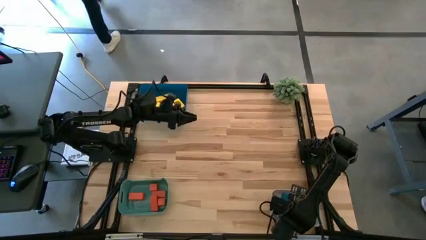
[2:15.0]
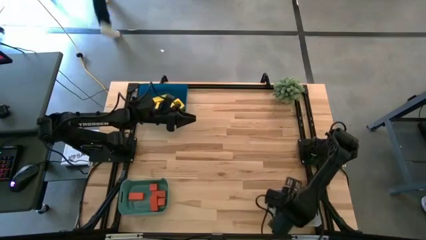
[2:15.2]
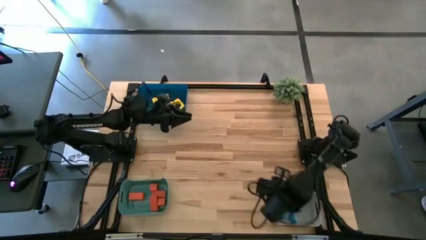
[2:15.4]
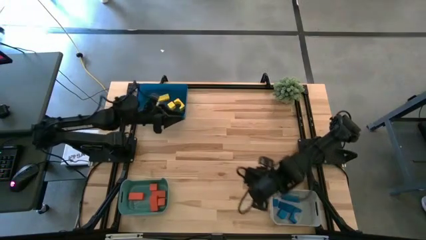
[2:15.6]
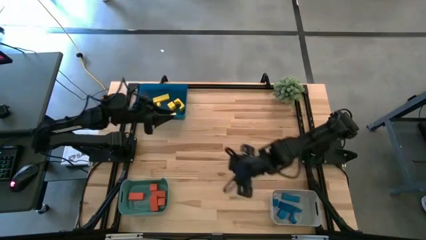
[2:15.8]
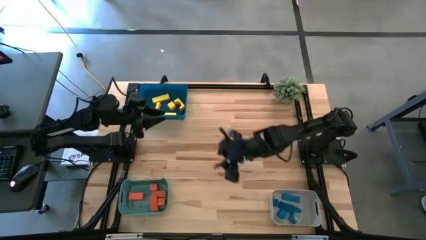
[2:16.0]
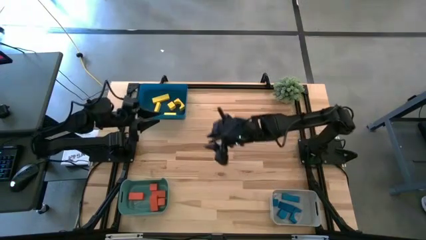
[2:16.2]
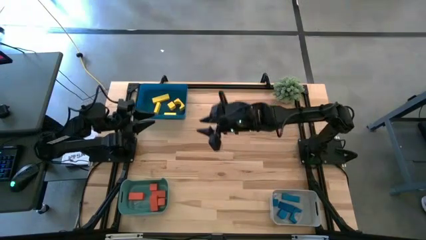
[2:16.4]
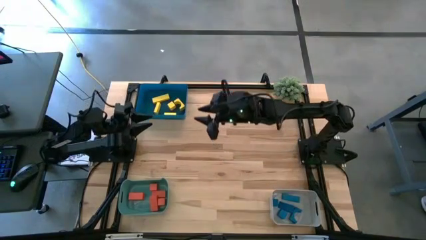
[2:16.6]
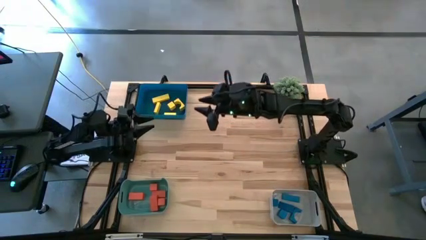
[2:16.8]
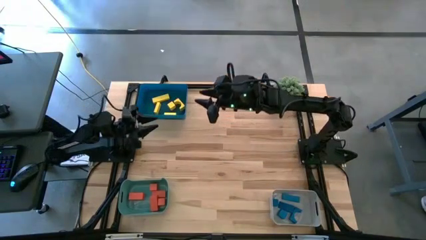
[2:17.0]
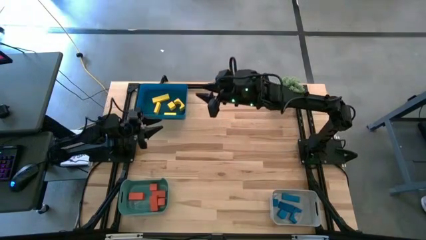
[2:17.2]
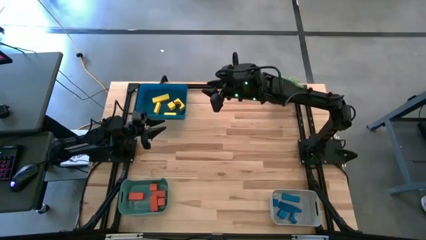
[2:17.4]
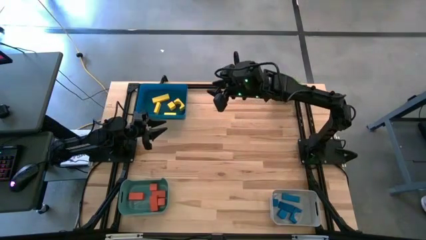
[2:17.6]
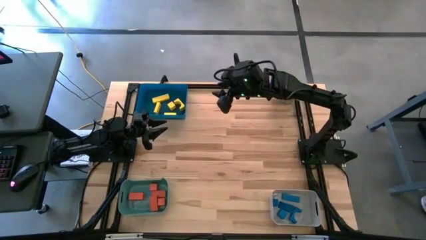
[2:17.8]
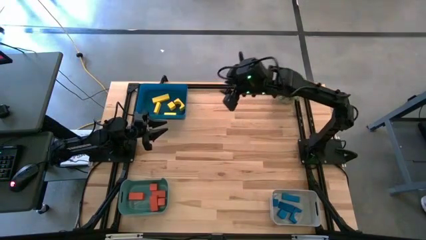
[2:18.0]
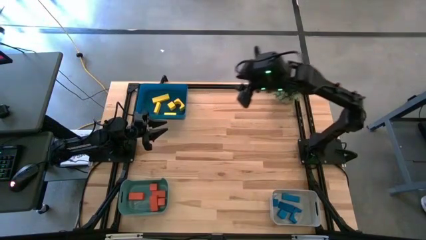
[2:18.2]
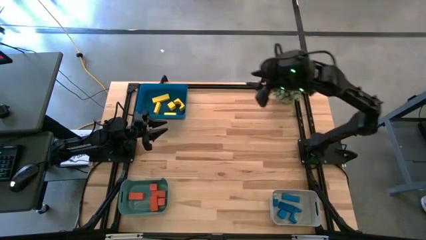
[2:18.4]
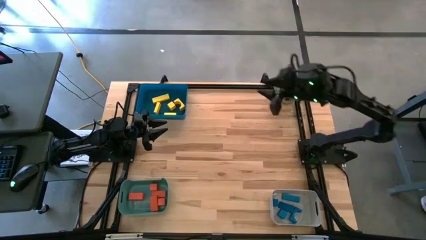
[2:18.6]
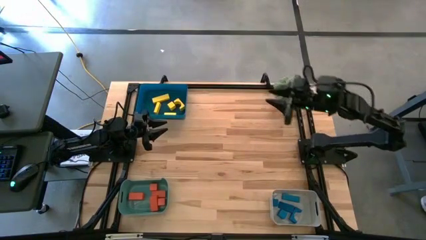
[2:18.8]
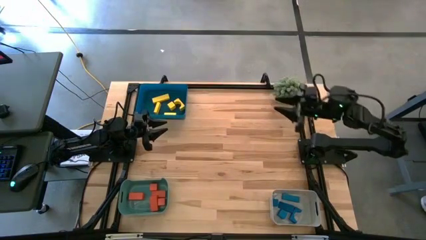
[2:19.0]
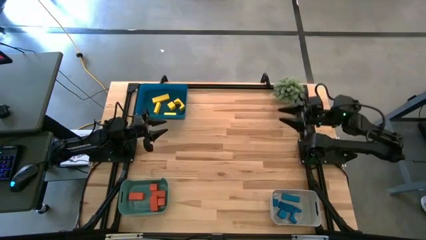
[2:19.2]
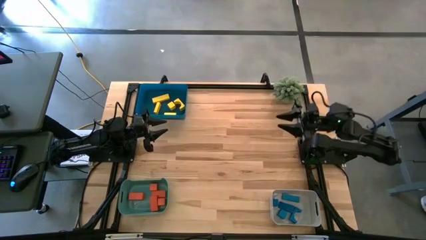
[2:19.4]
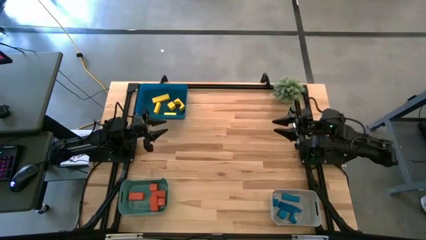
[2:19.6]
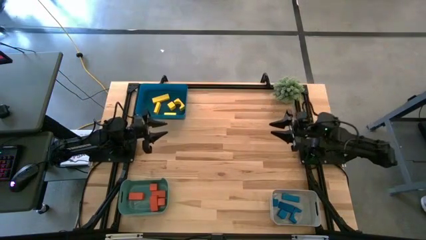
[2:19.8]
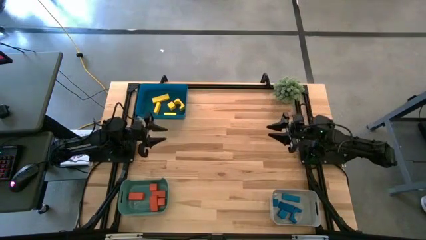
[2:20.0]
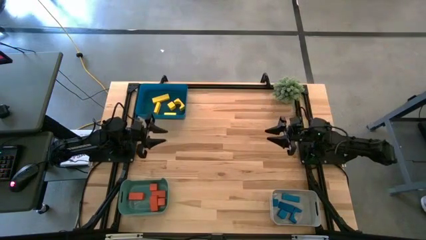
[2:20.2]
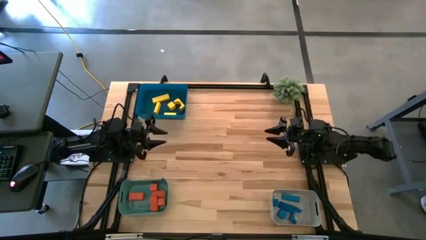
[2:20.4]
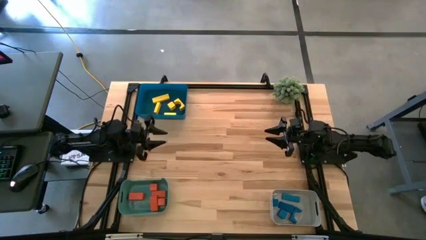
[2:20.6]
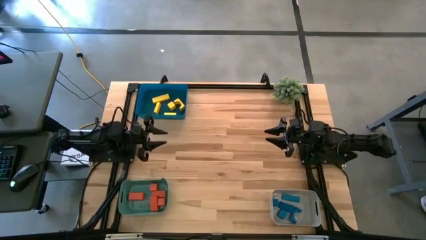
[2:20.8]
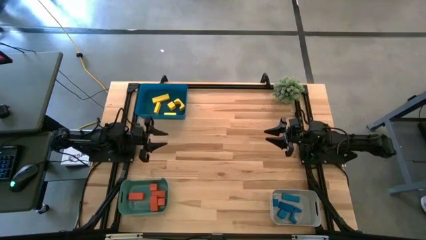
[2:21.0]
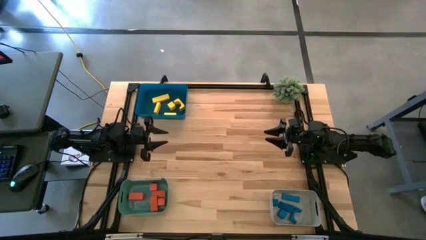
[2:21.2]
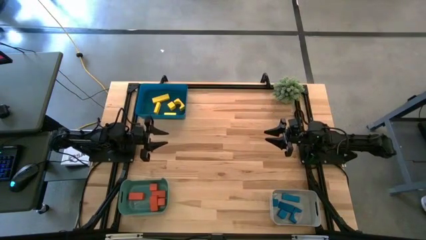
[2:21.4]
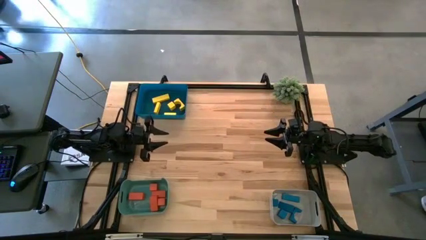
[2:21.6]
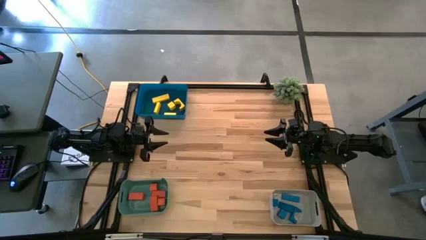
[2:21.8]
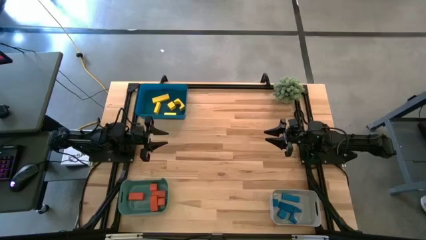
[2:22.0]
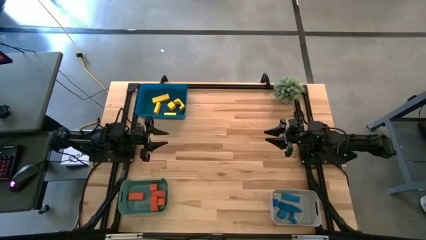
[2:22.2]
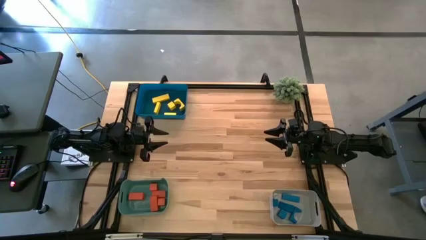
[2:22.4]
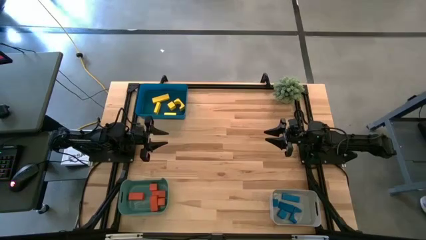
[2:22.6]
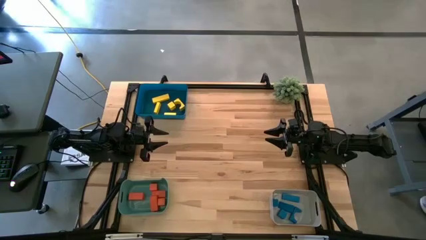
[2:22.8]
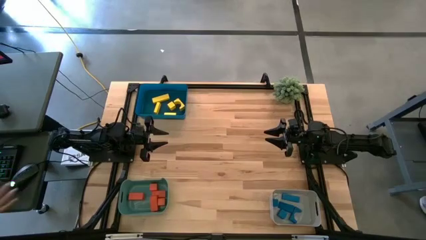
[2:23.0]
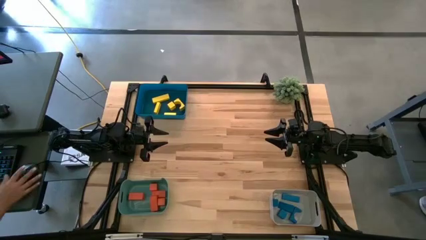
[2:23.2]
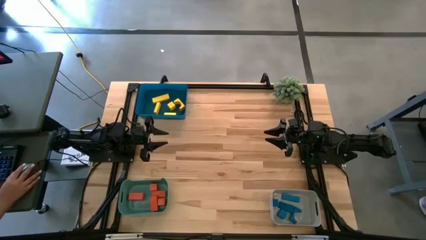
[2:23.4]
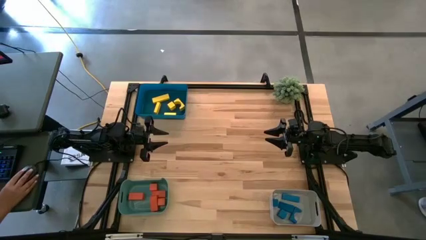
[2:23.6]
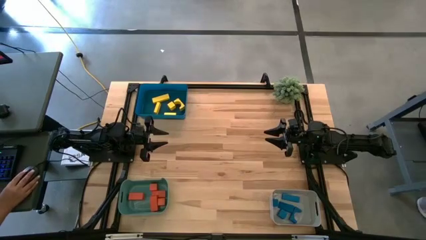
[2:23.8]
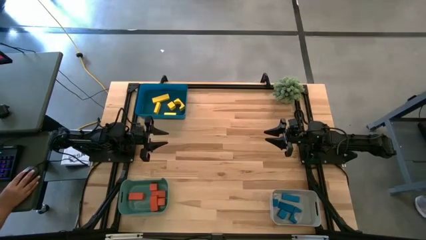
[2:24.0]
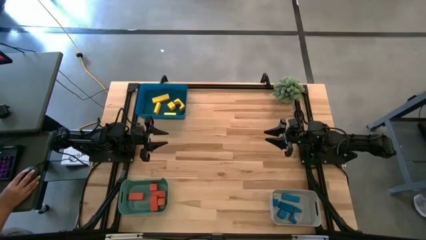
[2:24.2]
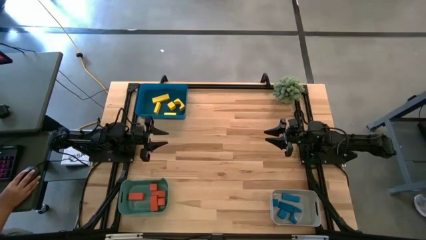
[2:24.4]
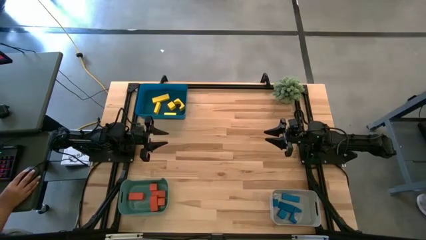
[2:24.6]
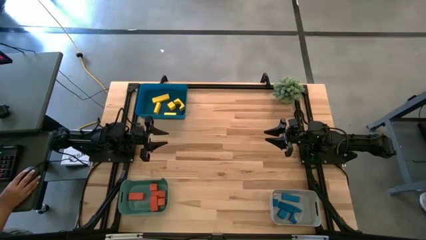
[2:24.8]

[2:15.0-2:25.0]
Task: Sort & place blocks by color
Return to Home Position

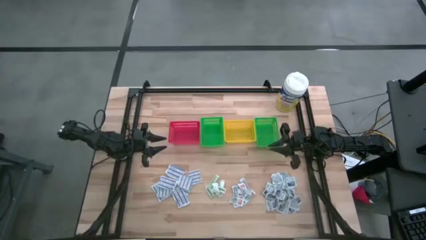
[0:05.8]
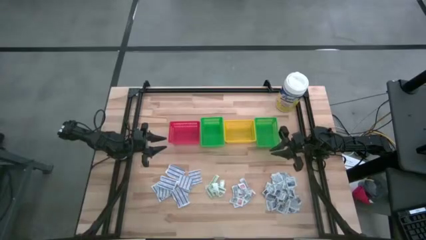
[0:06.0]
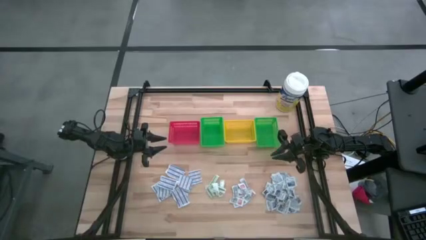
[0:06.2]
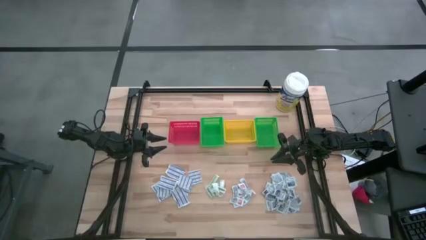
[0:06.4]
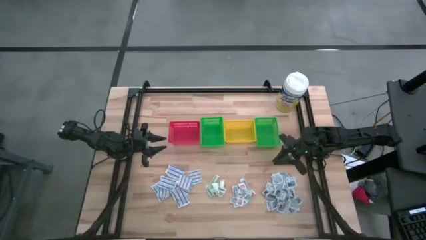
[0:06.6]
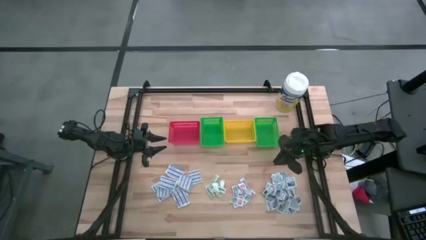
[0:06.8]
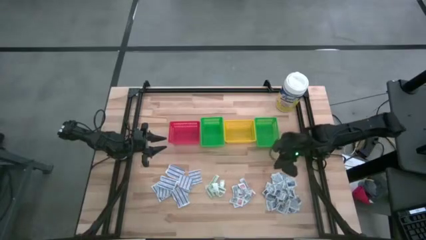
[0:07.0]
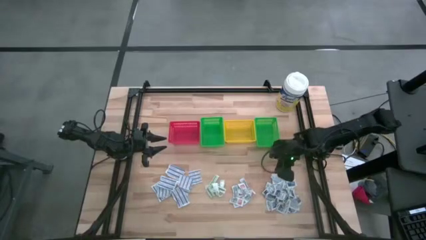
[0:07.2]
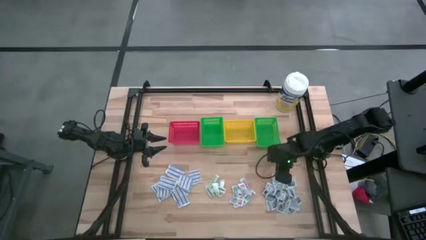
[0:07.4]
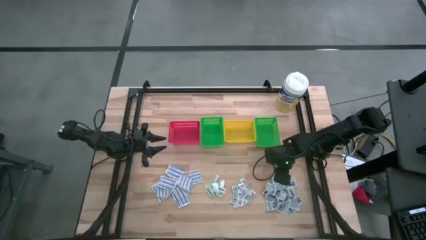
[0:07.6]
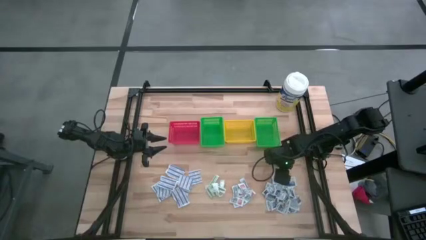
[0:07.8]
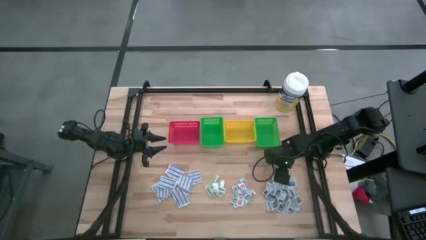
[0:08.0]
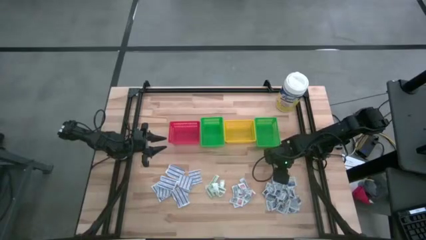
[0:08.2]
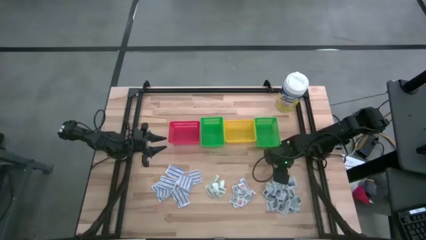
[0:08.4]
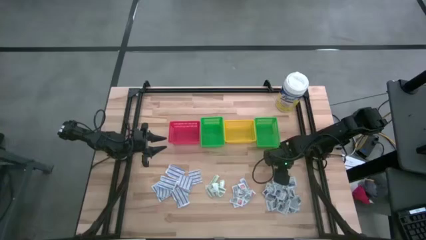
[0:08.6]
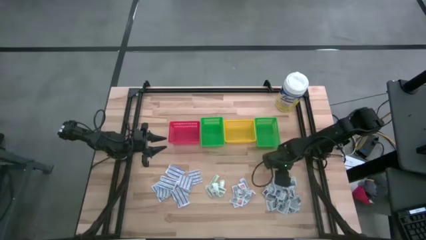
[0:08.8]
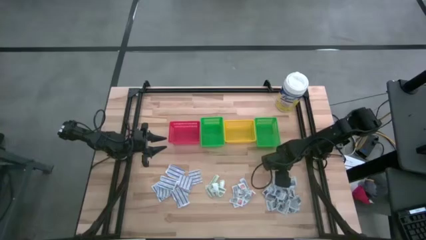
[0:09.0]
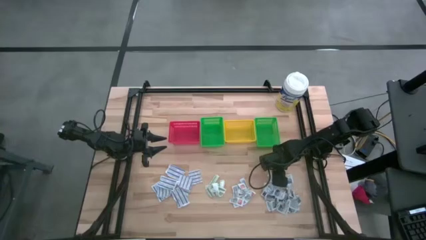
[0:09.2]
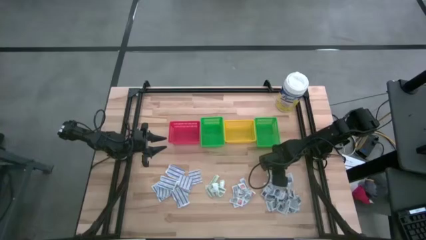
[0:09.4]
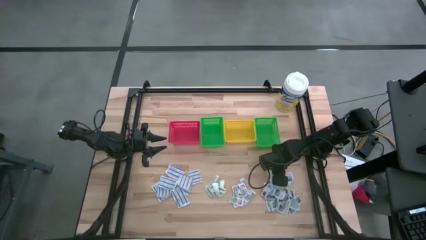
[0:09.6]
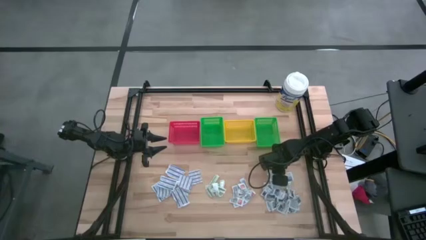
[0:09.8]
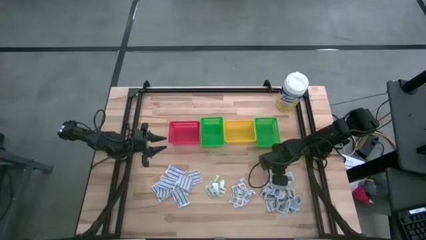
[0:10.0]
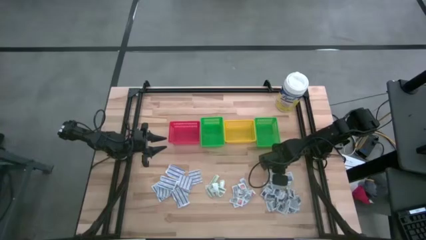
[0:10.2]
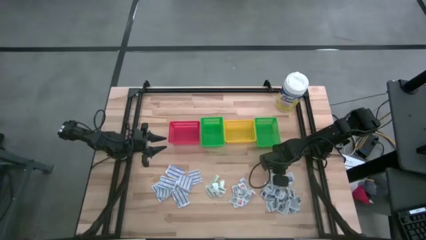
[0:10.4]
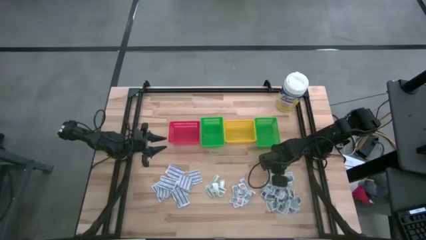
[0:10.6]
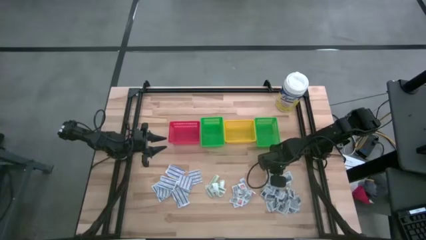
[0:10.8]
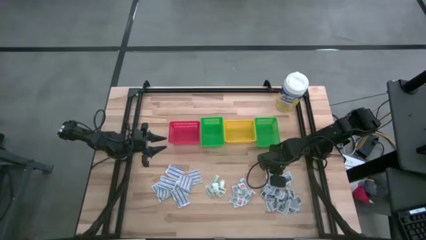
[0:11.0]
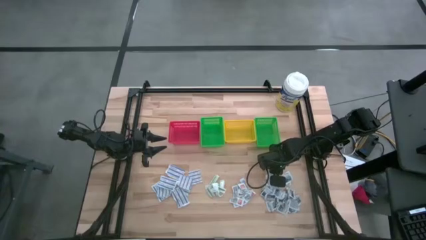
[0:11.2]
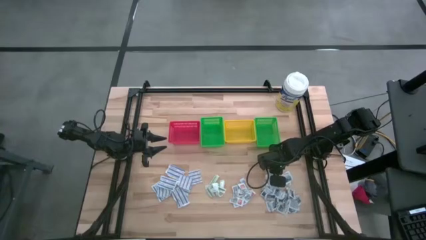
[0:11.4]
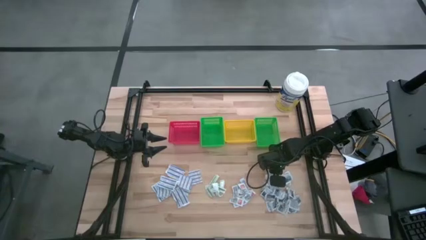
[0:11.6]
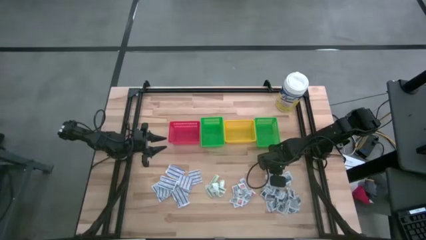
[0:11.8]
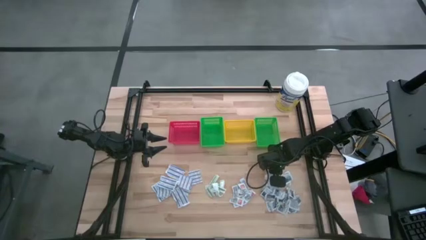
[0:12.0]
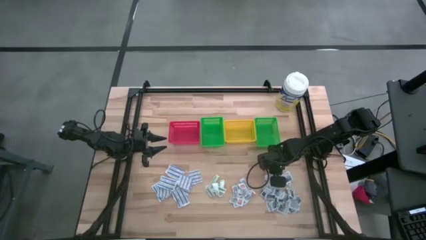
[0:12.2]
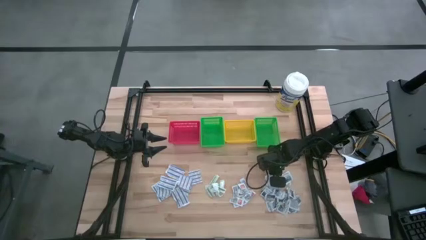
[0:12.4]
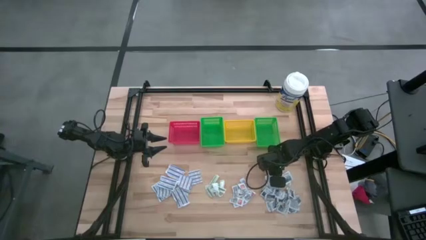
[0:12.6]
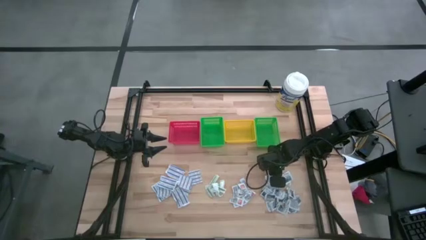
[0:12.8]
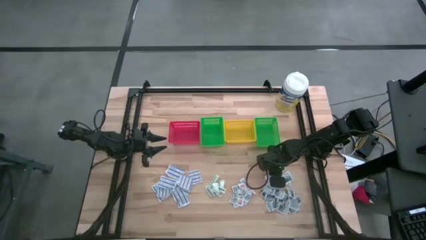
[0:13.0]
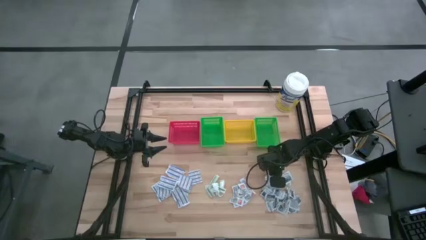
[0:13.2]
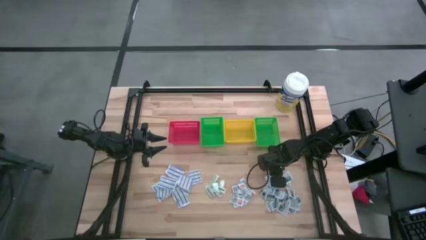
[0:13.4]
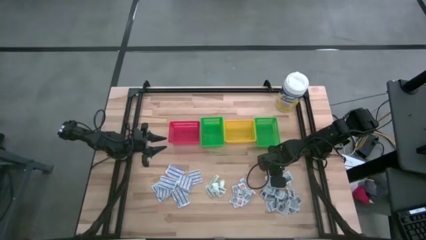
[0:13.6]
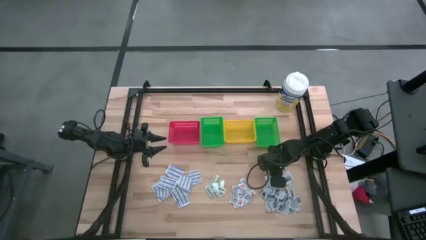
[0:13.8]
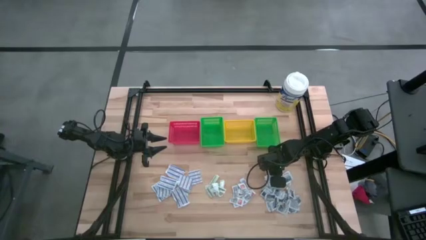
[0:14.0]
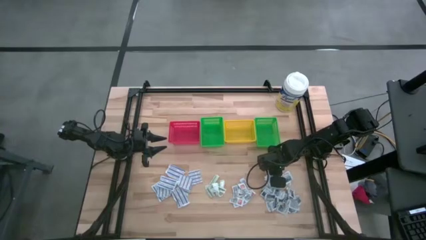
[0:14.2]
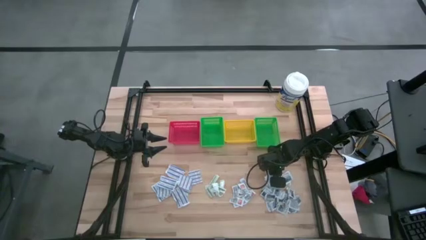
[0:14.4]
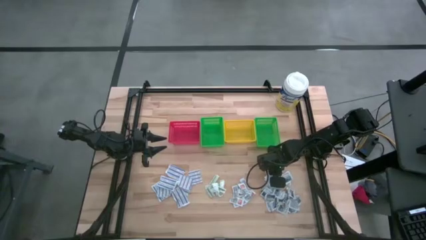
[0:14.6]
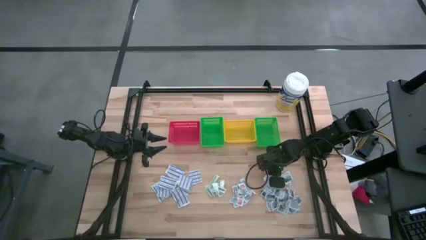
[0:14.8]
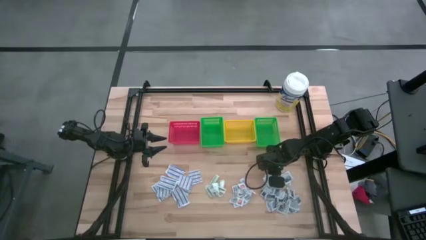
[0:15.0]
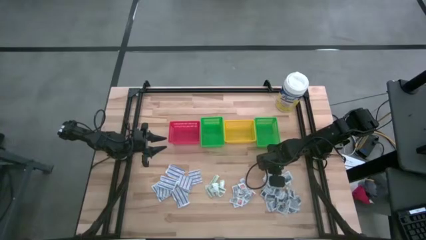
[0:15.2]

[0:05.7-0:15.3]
Task: Pick & Place First Aid Supplies
Put the alcohol pad into the red basket
